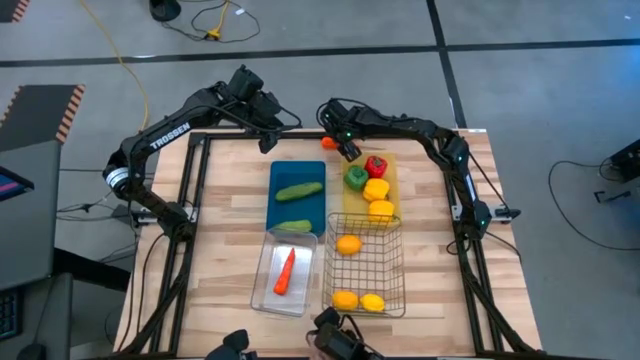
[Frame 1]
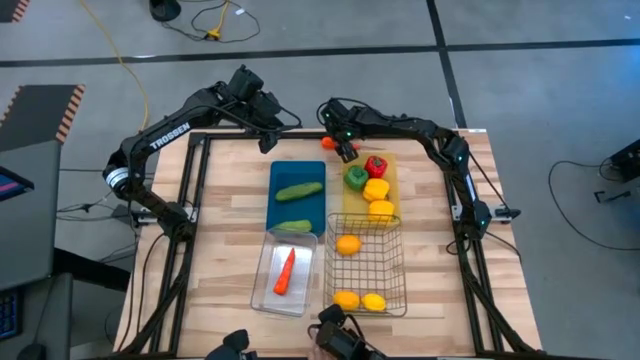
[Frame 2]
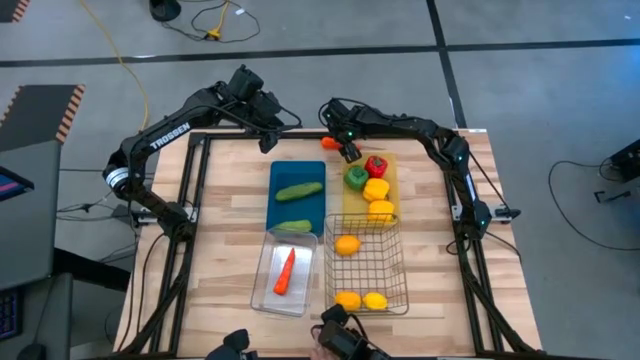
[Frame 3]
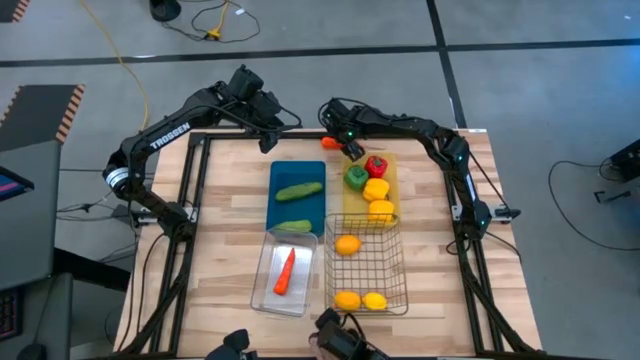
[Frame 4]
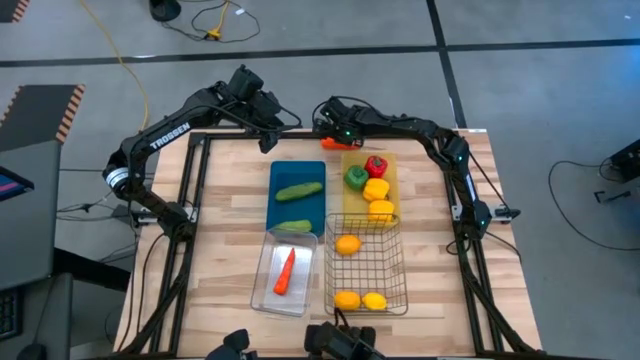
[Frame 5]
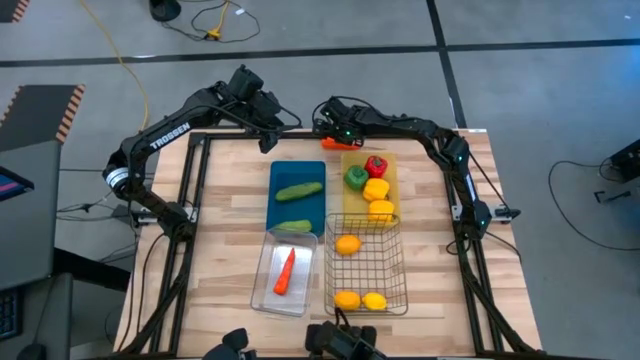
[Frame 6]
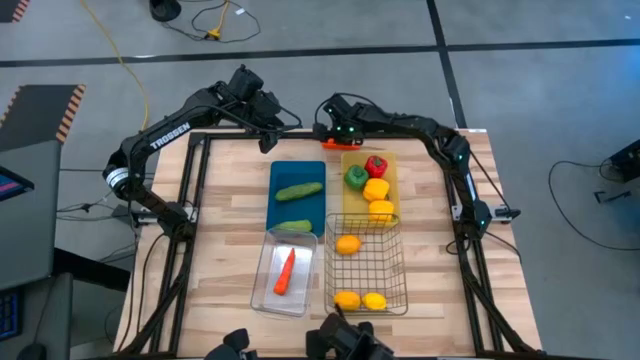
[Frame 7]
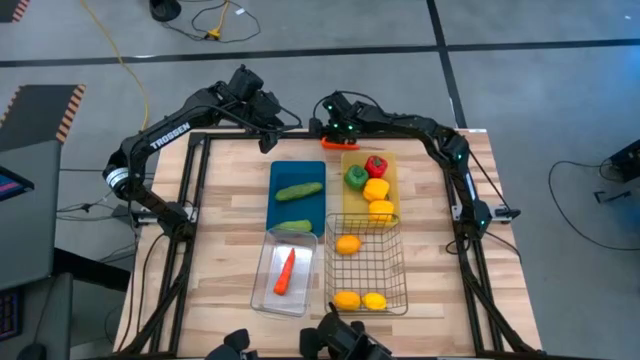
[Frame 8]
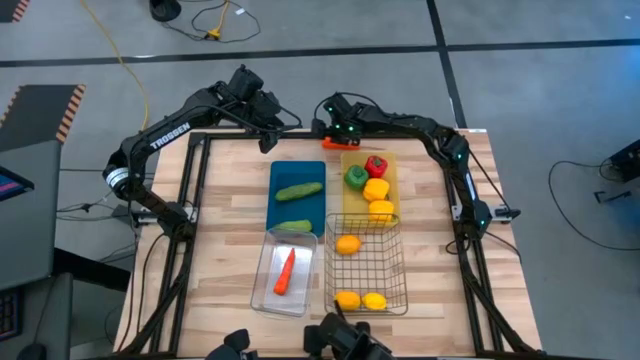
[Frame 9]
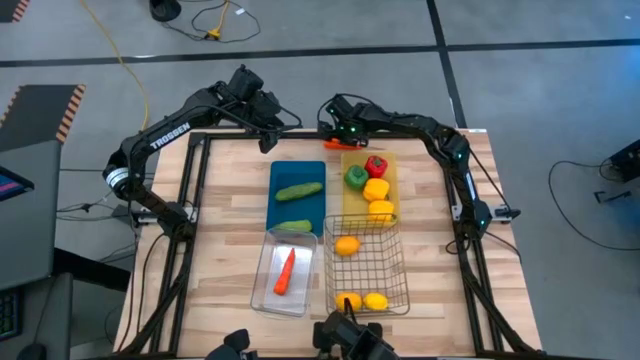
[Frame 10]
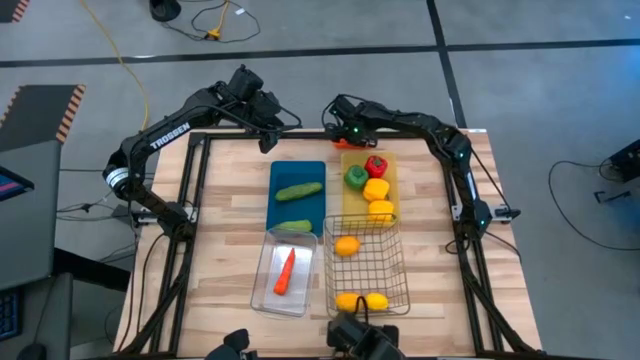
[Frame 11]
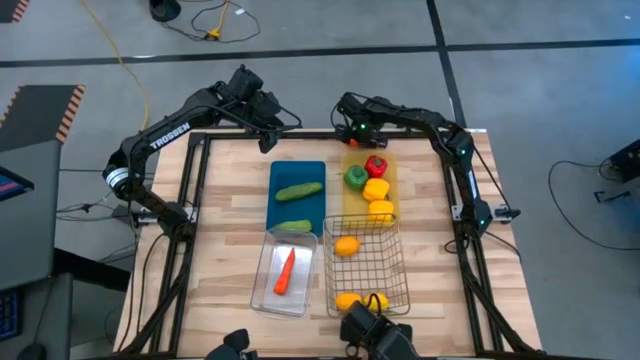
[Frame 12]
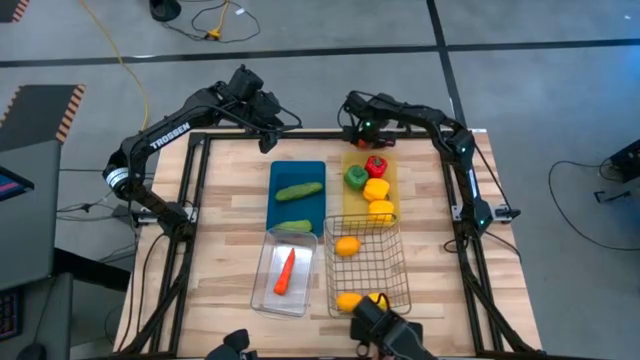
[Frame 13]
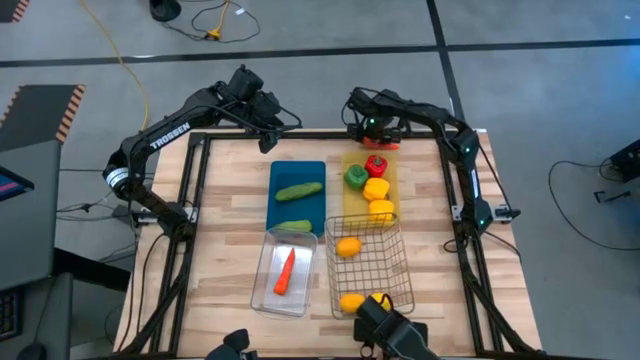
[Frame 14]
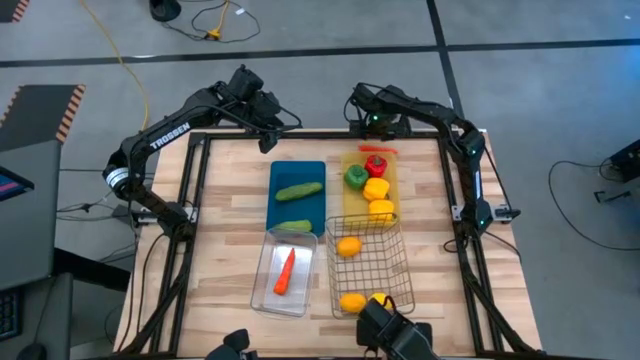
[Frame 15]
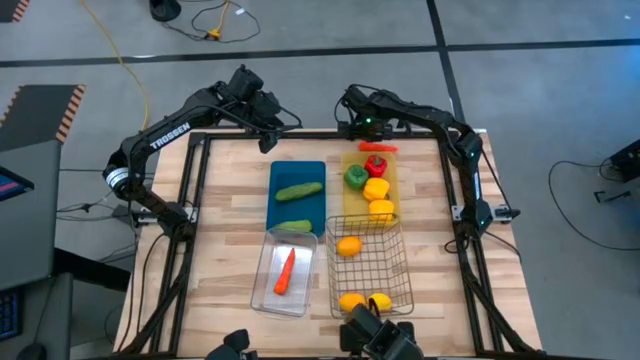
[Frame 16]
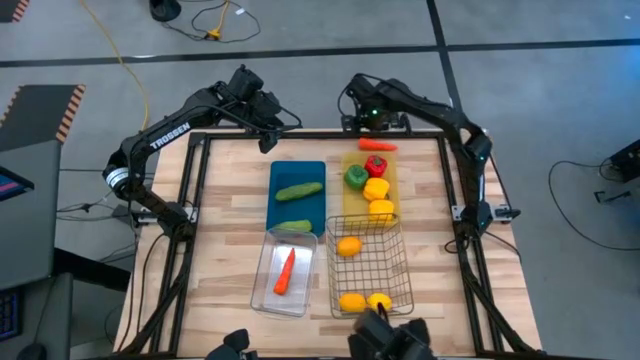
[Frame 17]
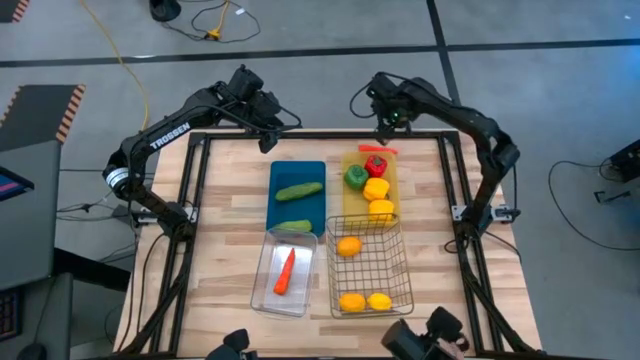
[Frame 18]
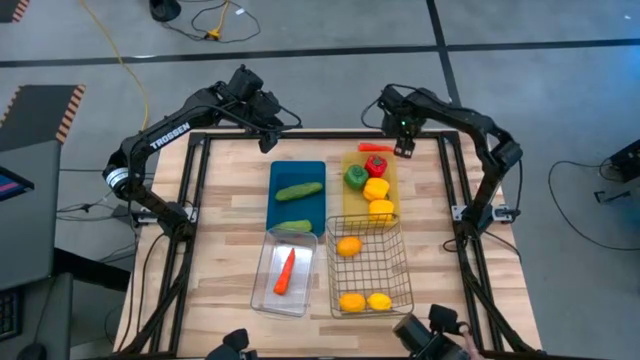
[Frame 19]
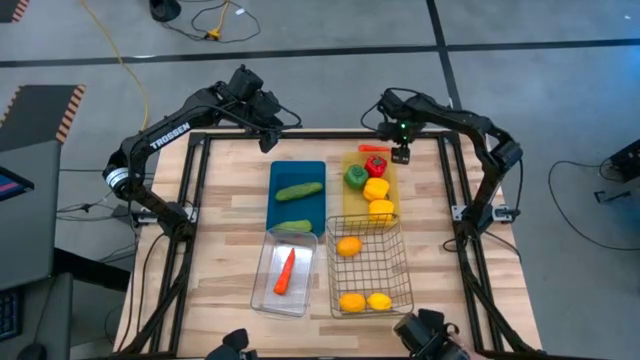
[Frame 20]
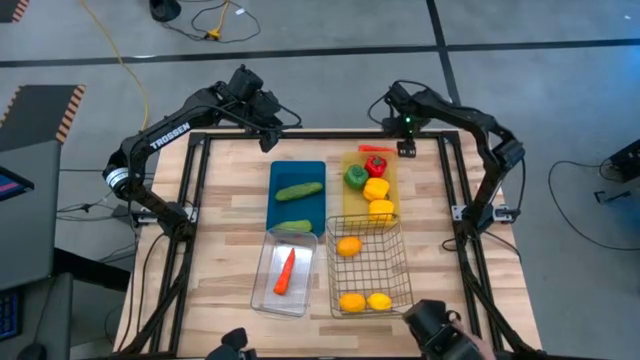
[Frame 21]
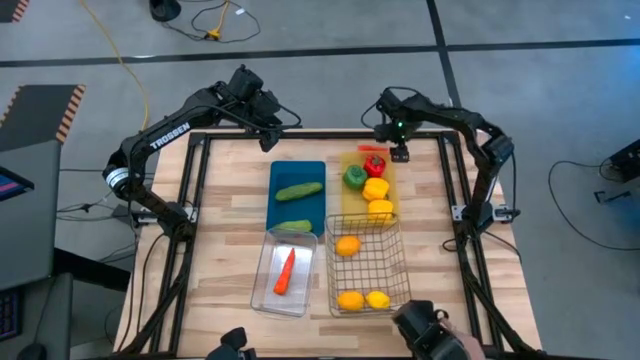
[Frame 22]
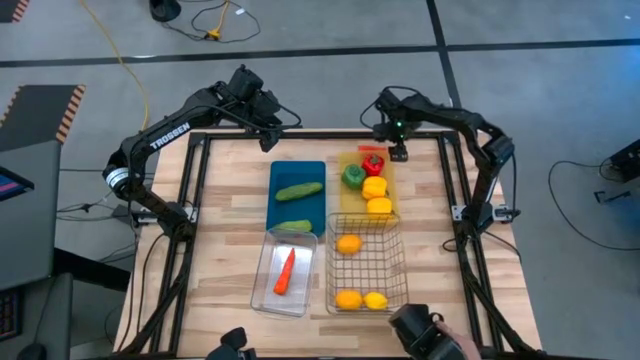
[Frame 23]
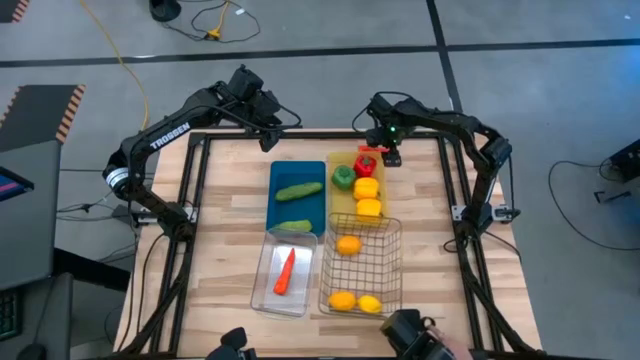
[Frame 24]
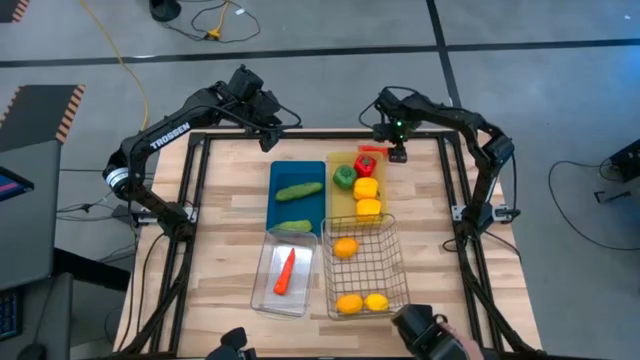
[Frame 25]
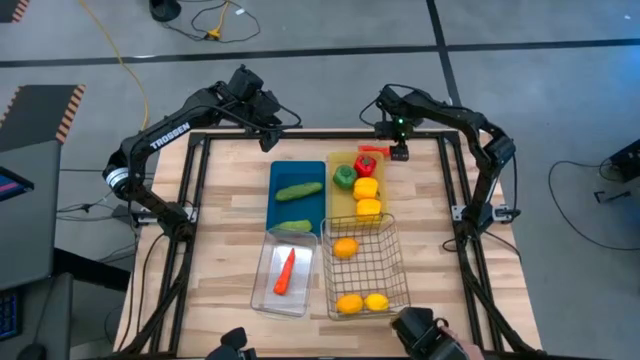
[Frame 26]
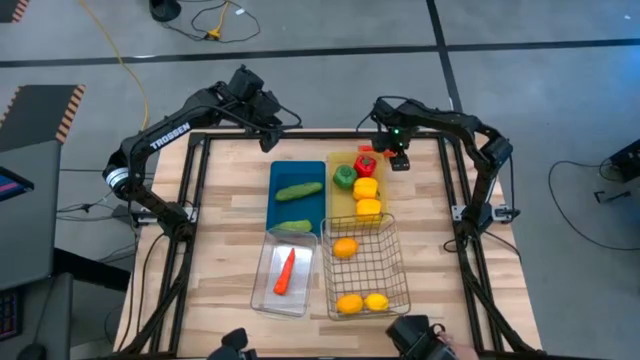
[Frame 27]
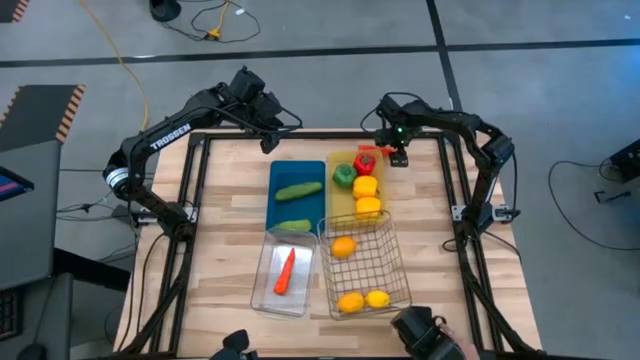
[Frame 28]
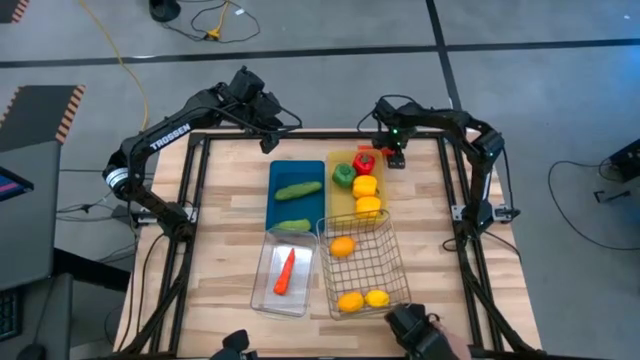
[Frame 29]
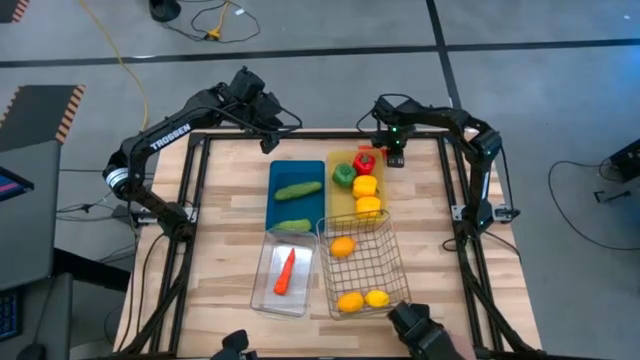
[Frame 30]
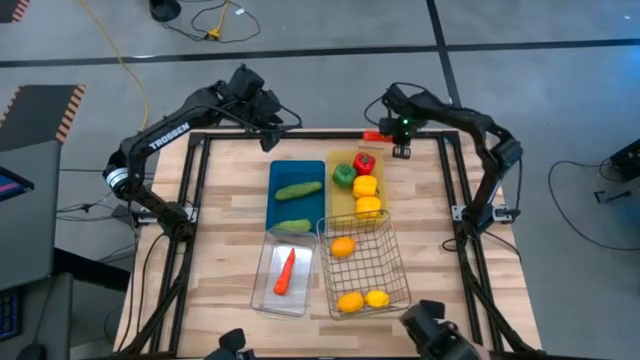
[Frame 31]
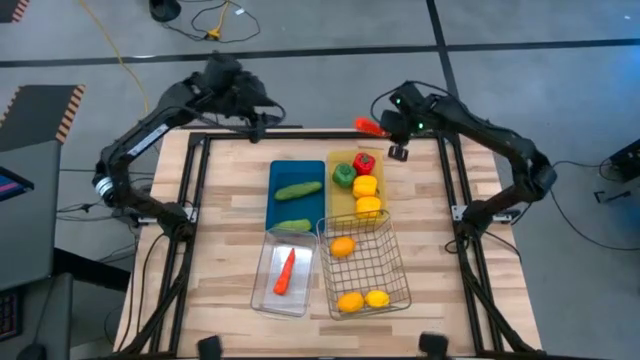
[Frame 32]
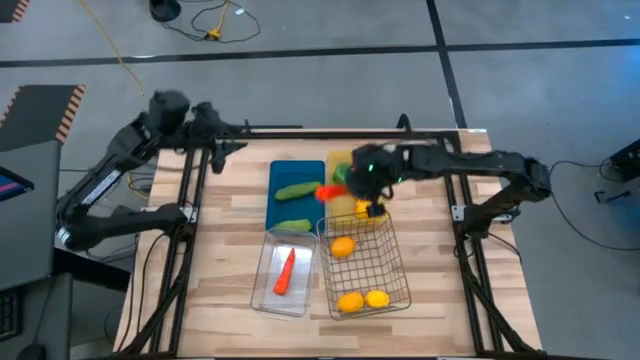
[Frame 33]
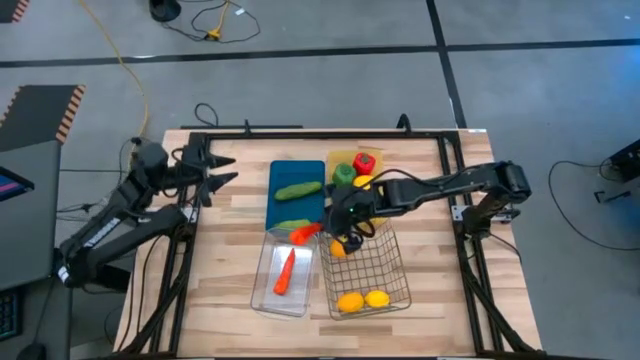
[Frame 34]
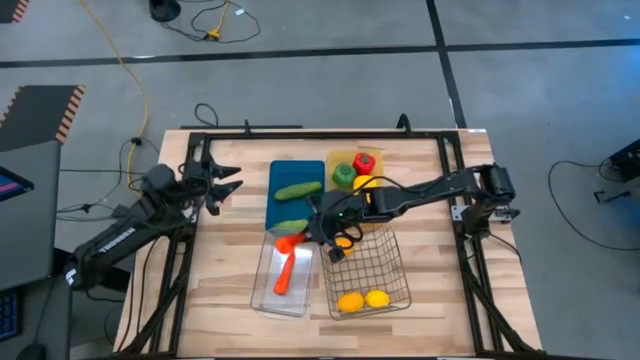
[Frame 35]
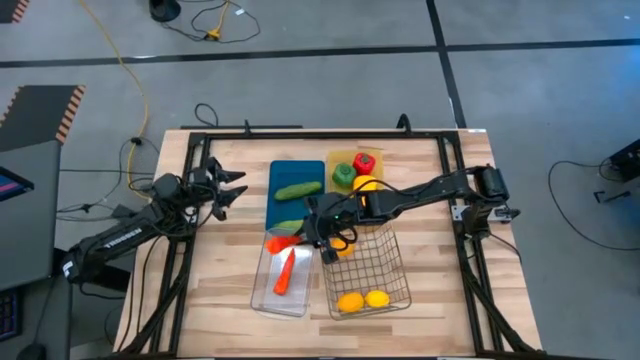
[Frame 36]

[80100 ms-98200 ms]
Task: Sort produce into baskets
Put the carrot into the transparent basket

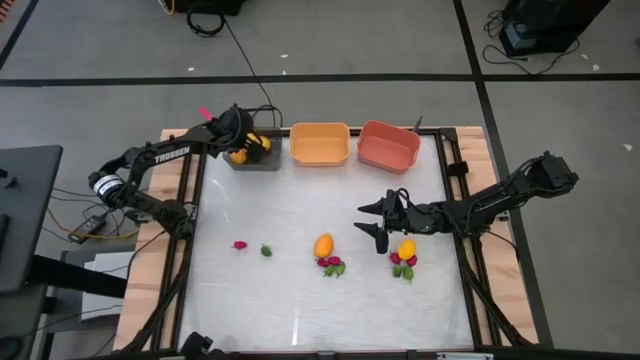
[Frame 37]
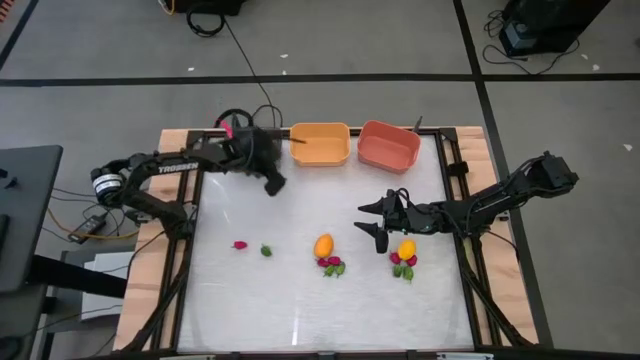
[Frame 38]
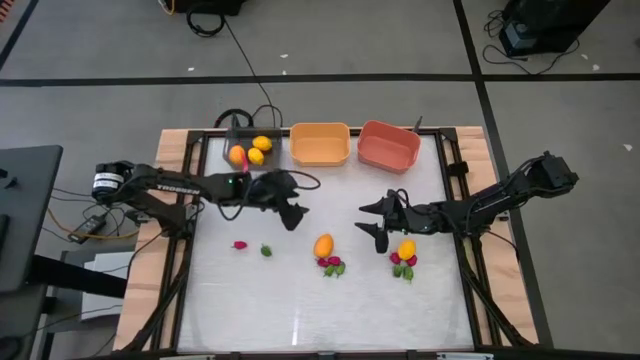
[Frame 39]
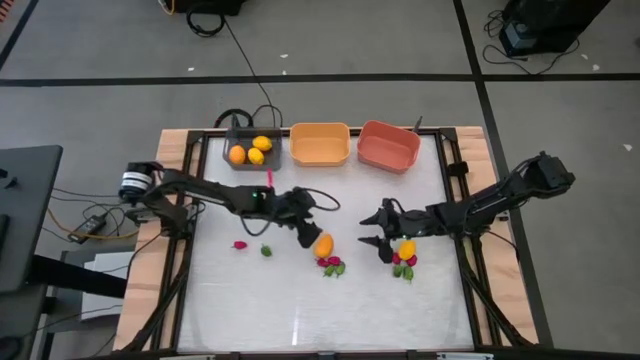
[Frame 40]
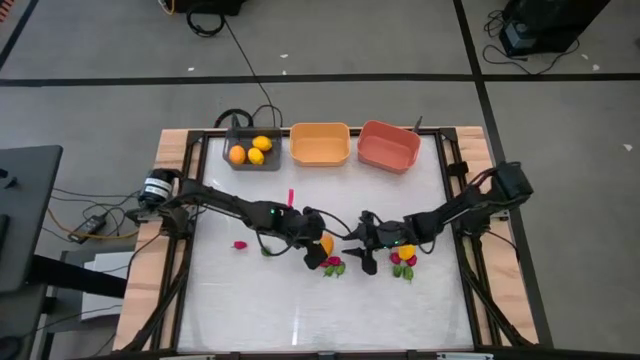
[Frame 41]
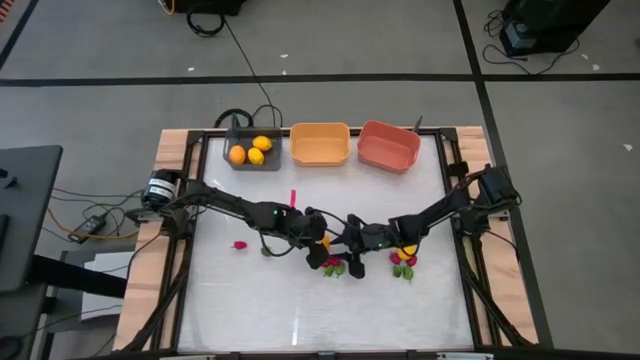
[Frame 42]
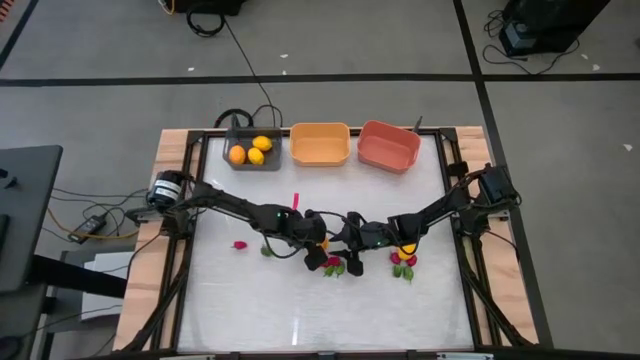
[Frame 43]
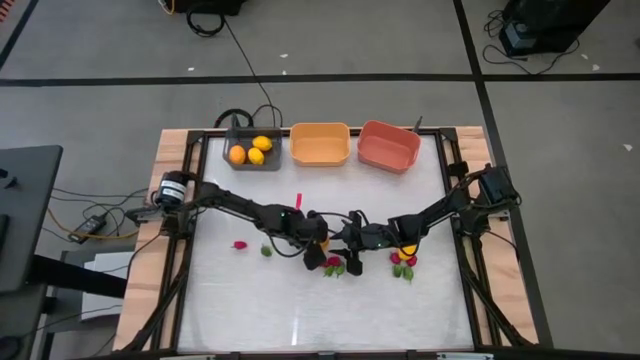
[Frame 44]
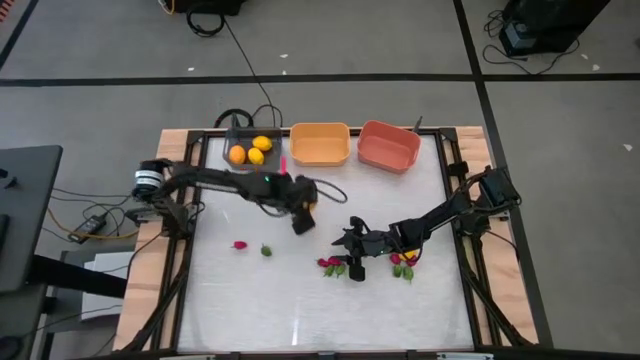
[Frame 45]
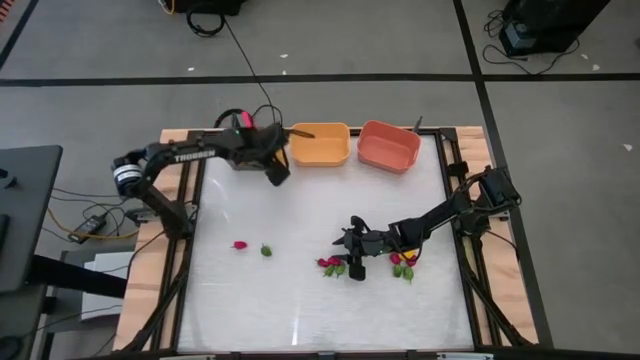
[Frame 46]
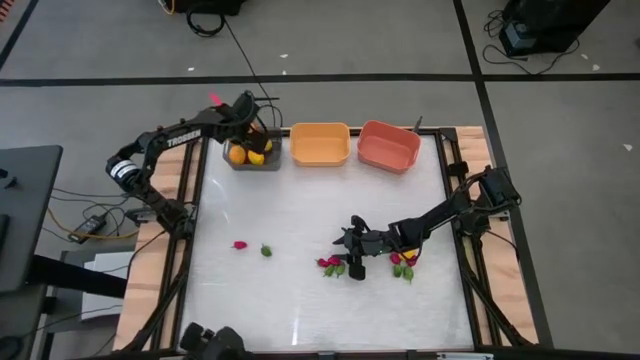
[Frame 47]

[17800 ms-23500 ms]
Task: Sort produce into baskets
Put the lemon into the black bin
